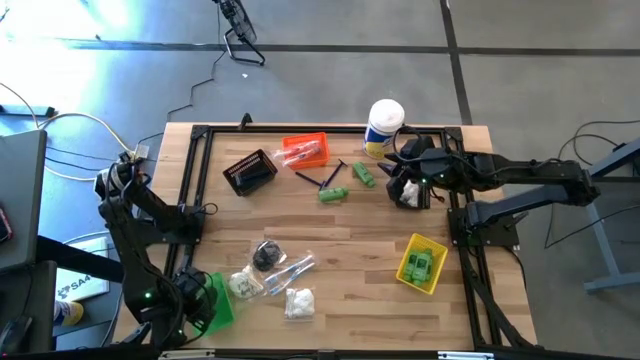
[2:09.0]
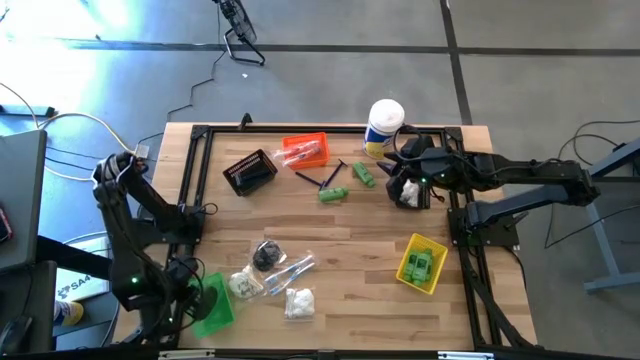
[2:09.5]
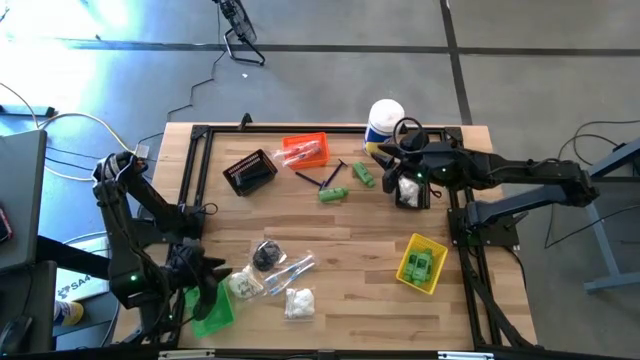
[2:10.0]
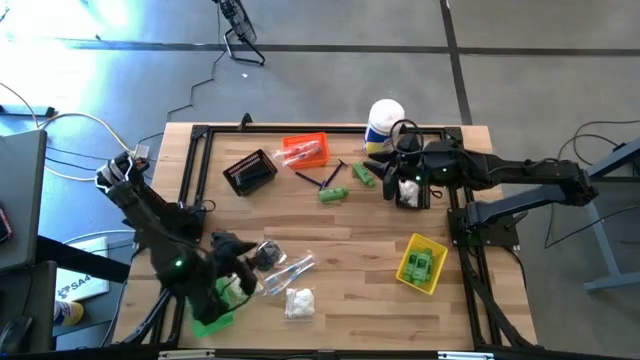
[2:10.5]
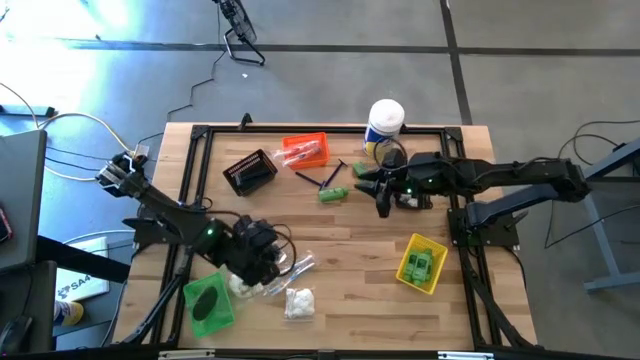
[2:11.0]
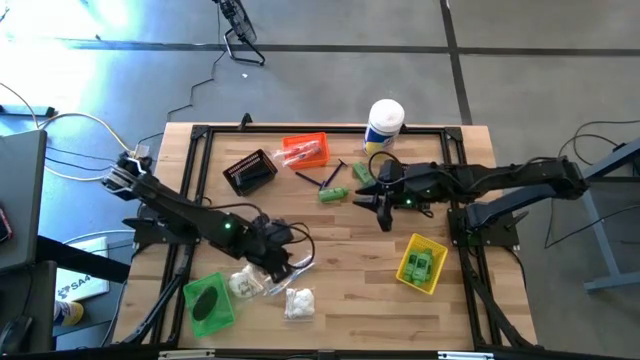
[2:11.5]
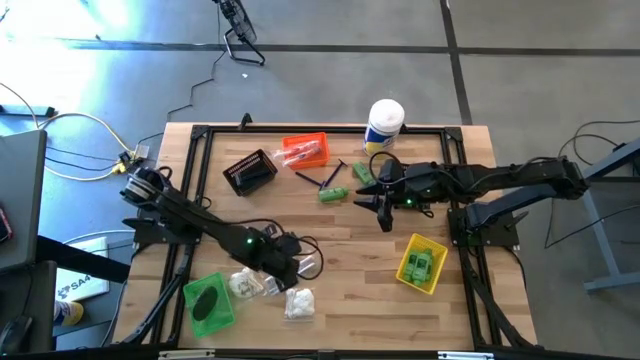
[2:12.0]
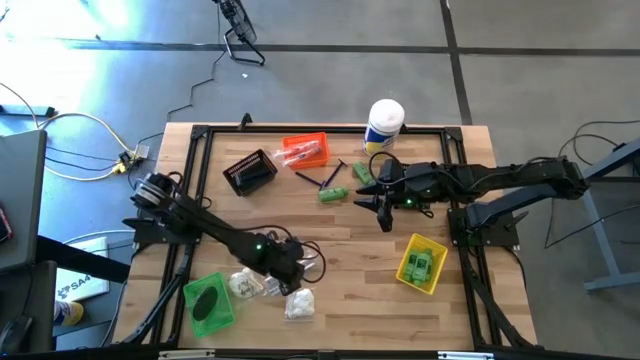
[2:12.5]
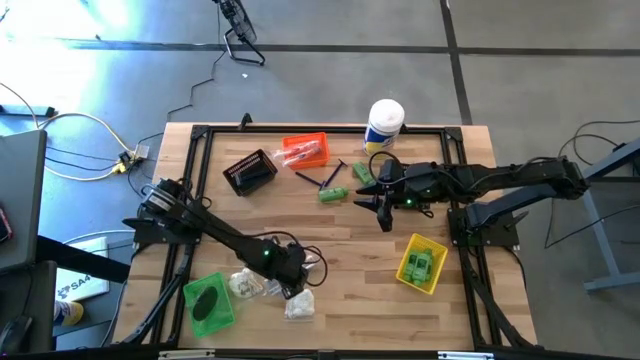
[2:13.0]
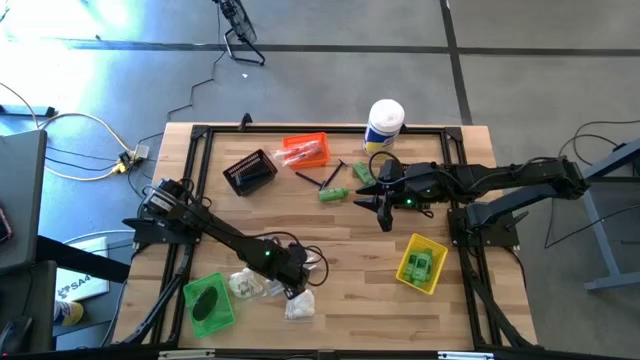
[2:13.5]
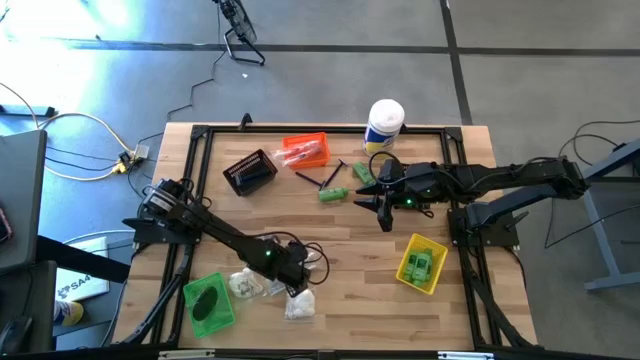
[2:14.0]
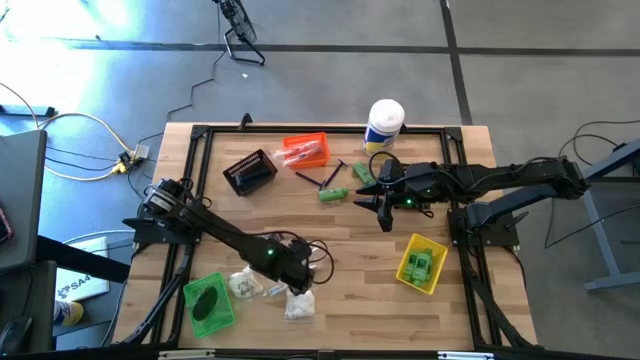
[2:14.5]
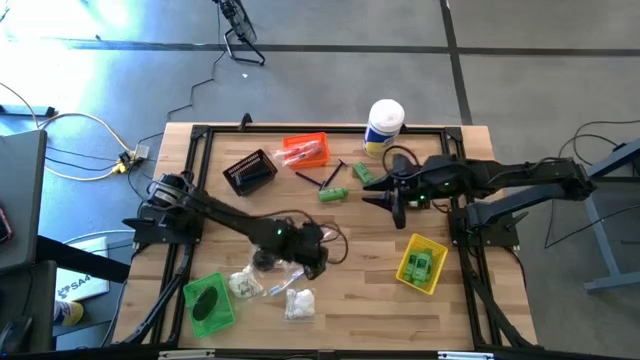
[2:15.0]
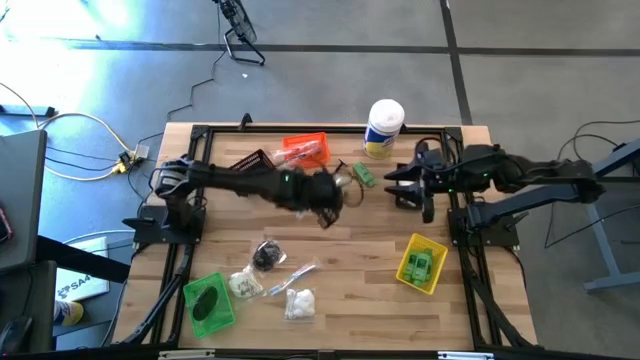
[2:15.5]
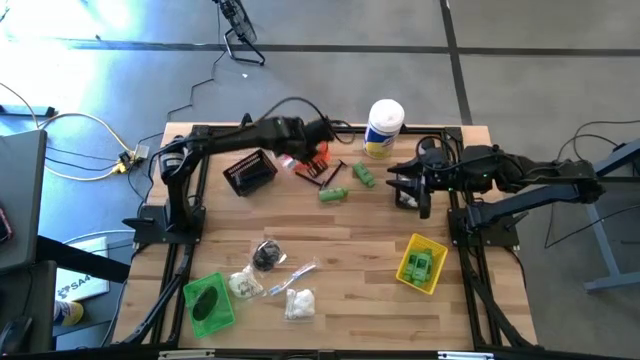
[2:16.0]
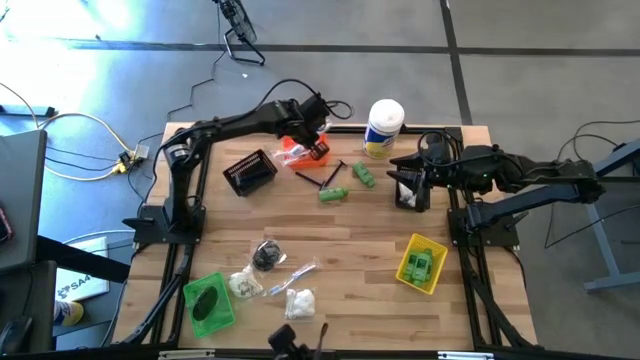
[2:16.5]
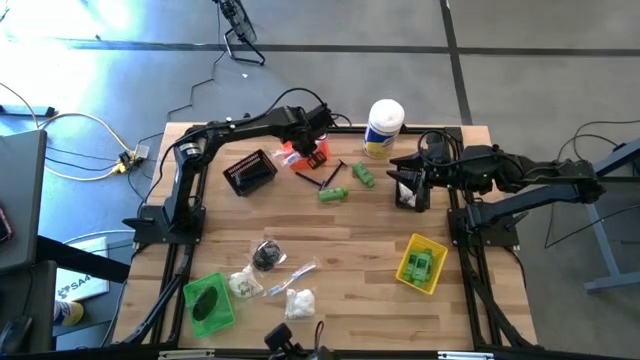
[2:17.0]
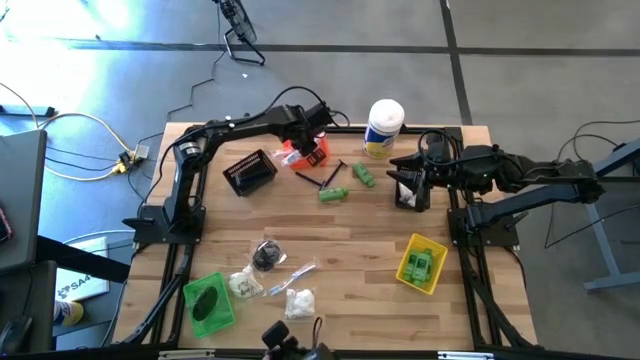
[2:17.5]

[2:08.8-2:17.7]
Task: Pick & Place Travel size toiletries
Put the blue toothbrush into the orange bin

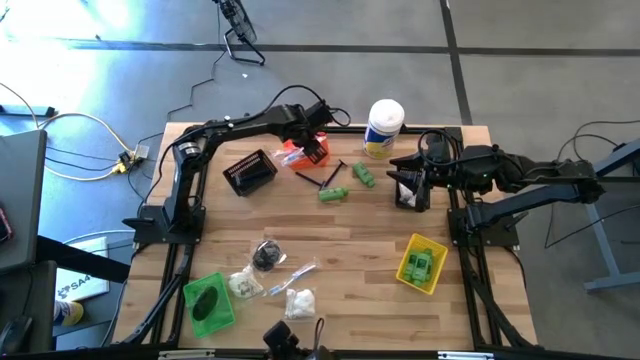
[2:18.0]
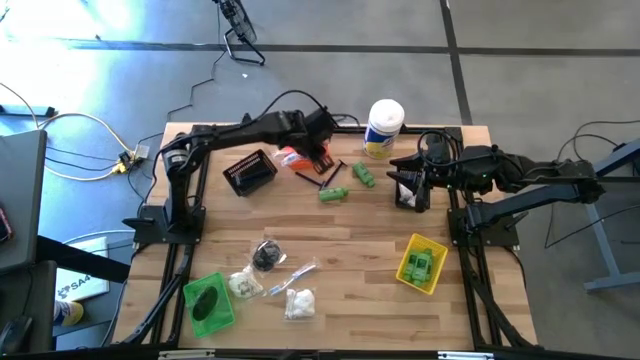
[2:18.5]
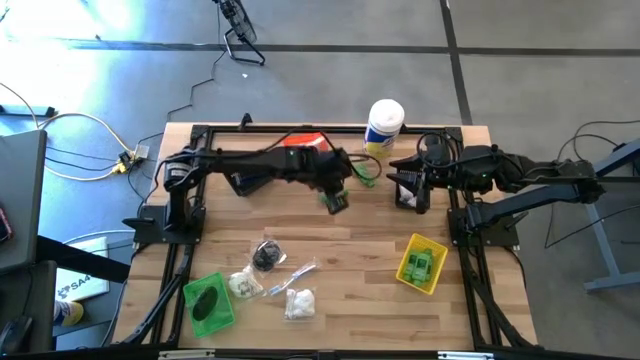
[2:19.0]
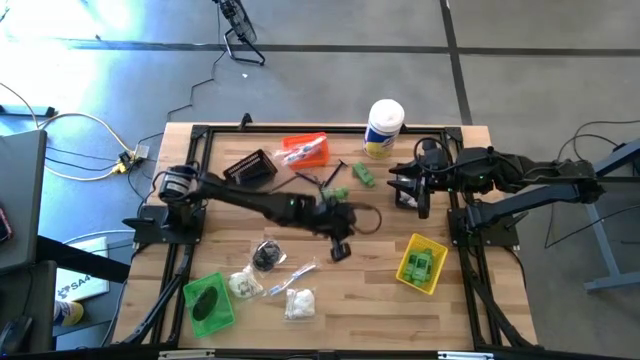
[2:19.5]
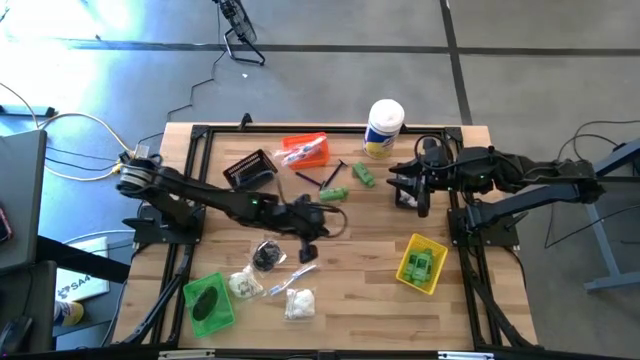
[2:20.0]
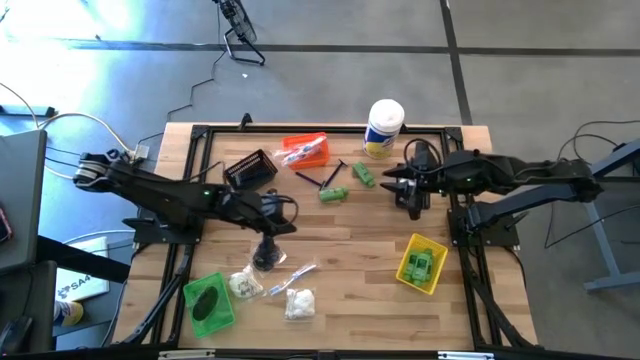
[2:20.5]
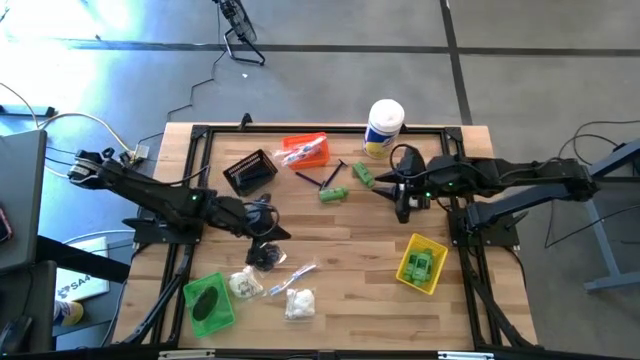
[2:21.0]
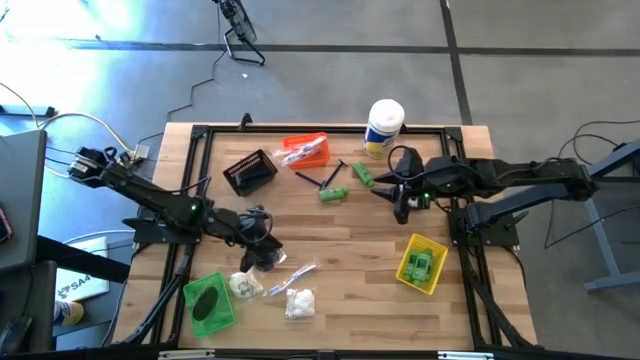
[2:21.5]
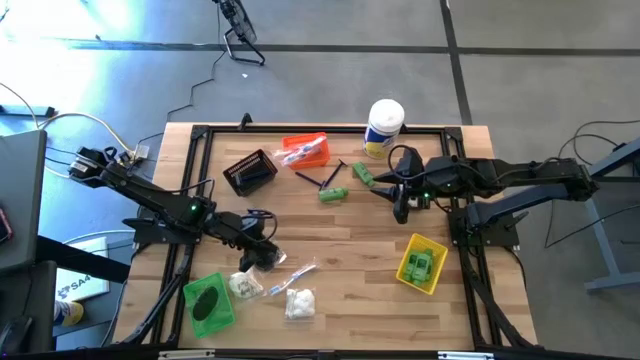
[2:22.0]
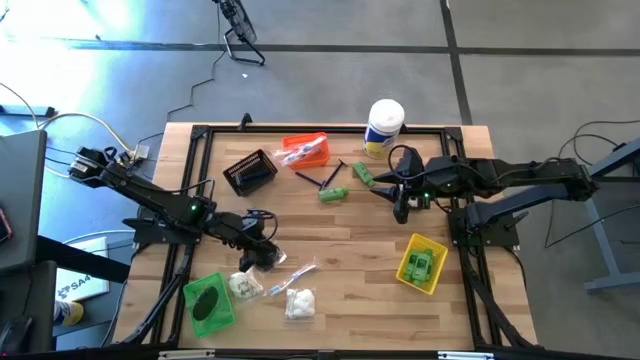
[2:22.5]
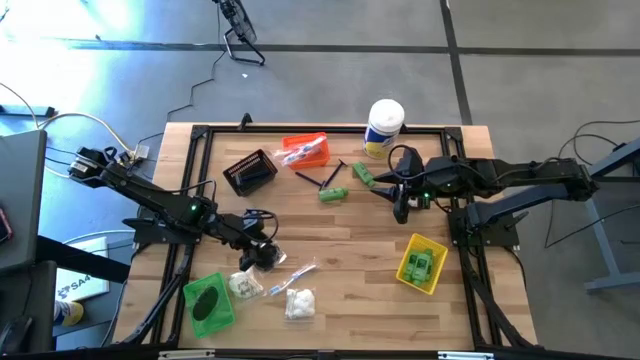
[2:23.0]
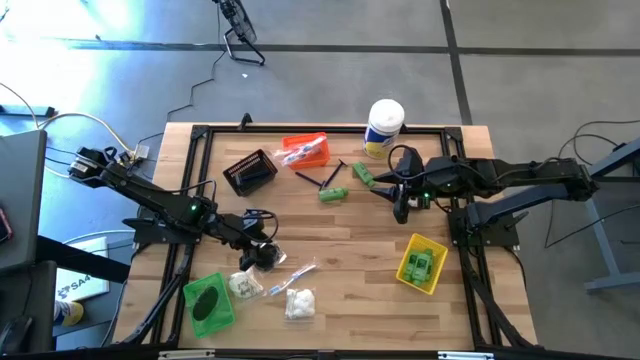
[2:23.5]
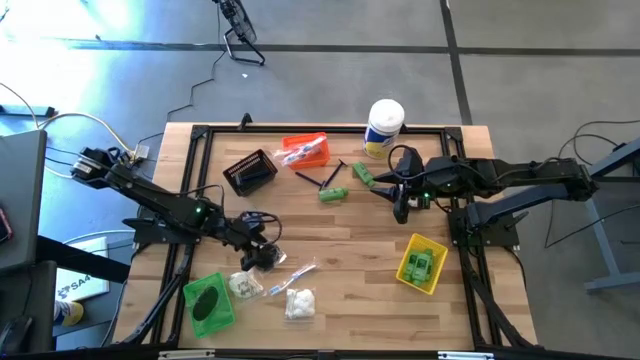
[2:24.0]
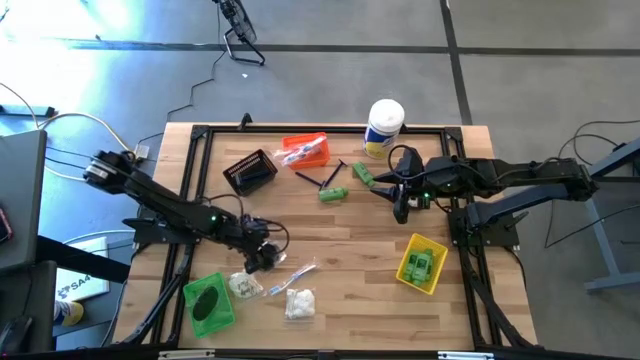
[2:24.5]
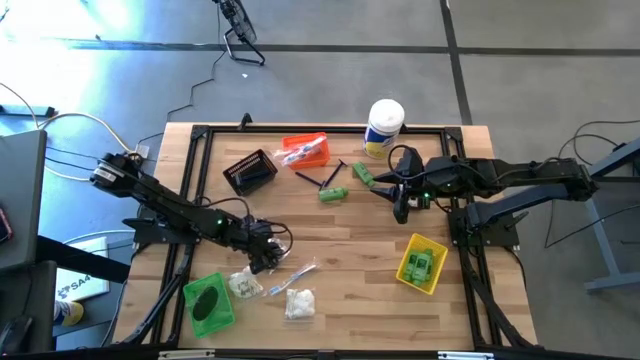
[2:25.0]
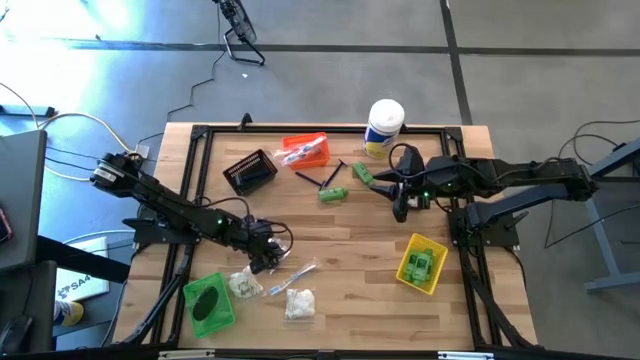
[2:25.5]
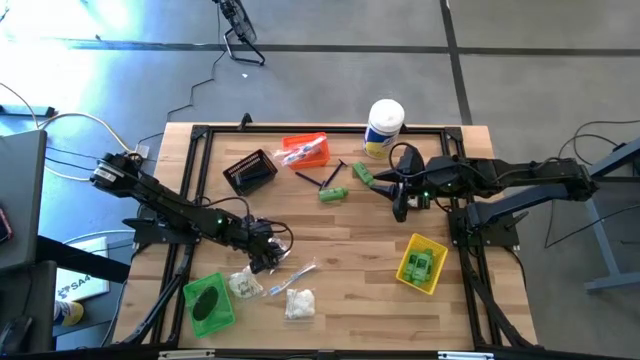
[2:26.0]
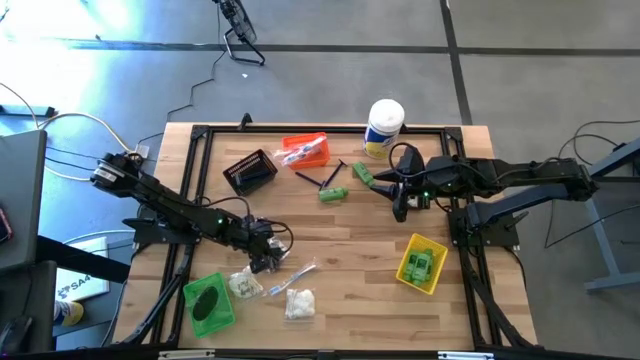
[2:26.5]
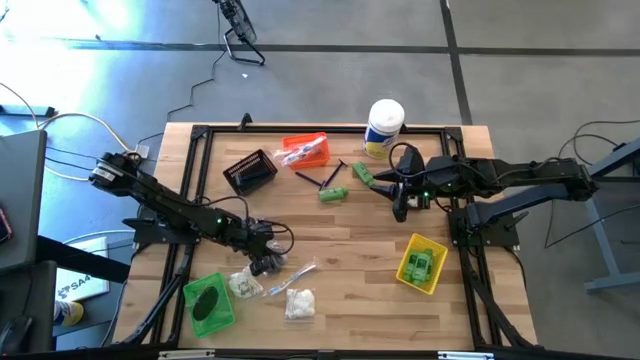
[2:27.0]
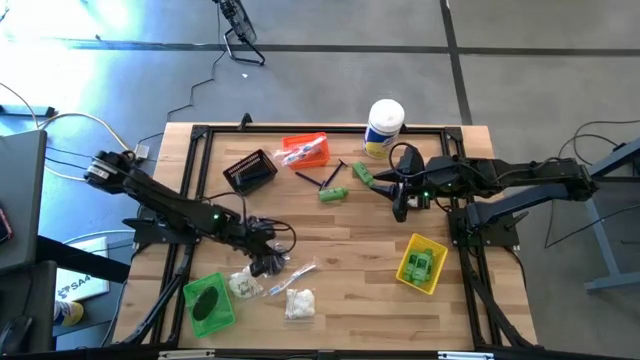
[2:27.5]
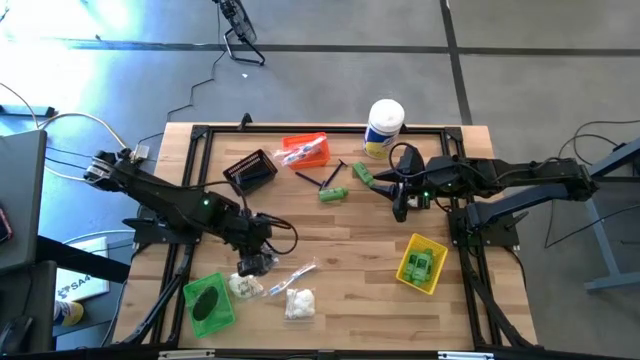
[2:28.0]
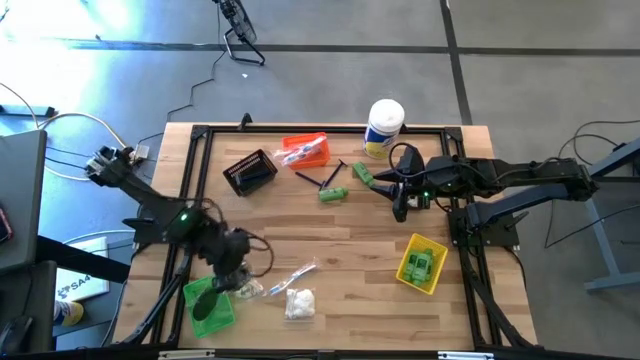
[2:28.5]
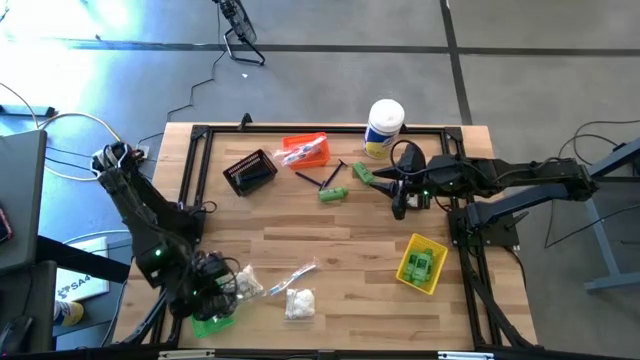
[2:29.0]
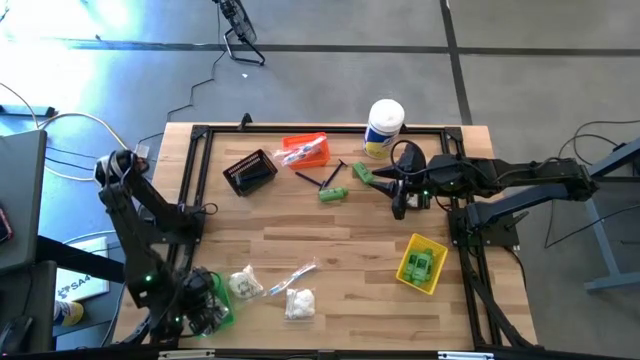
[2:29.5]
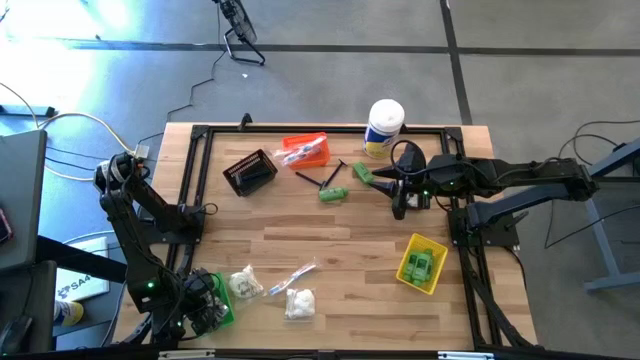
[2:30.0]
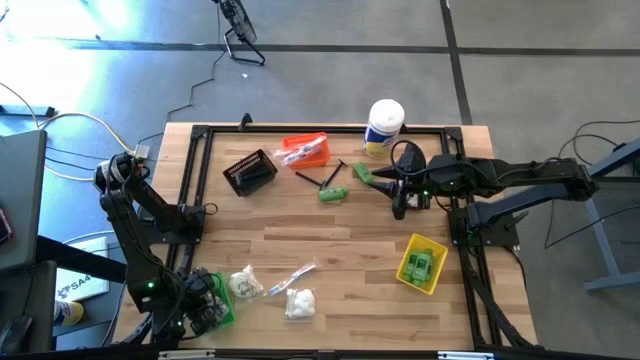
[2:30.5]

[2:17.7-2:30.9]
Put the black hairbrush into the green bin

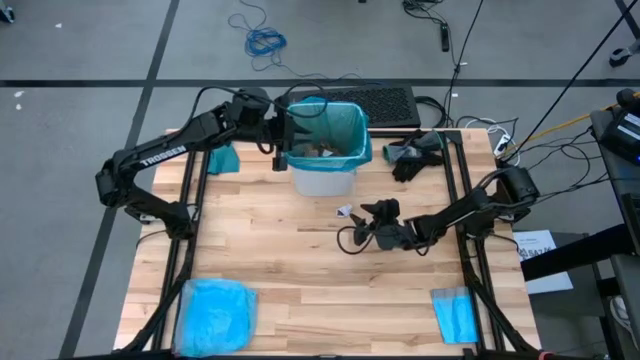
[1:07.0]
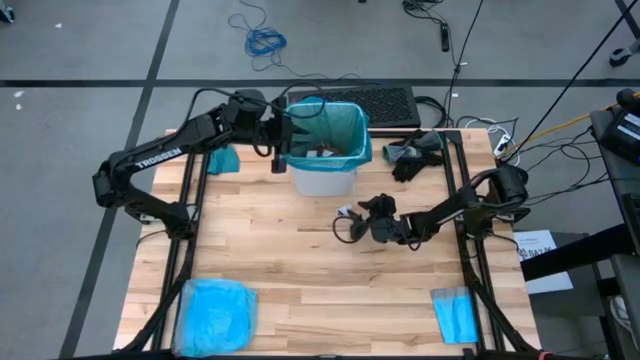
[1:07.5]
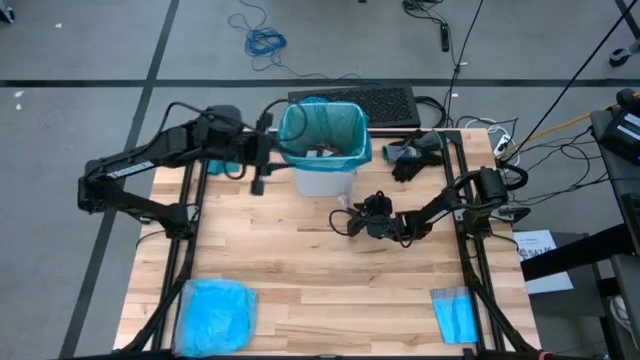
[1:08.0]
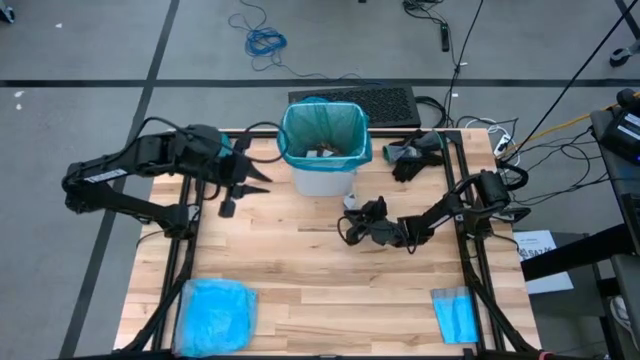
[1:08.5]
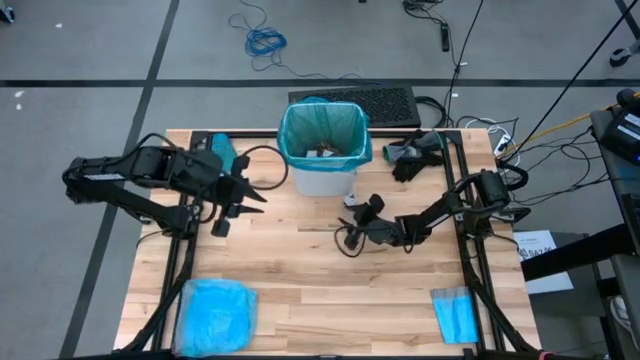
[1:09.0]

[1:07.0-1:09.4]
Task: place trash/remove bag and relplace
Put the white paper into the trash bin
